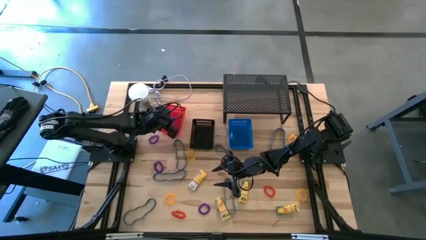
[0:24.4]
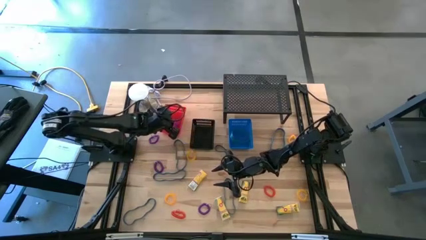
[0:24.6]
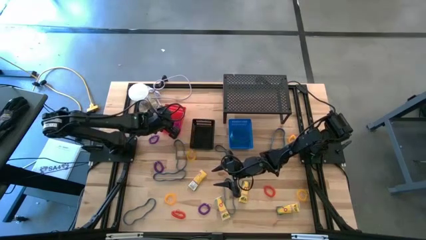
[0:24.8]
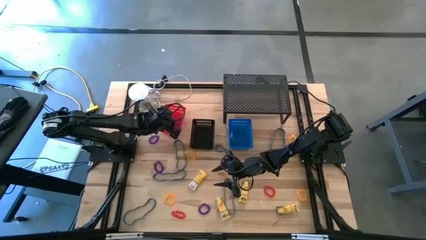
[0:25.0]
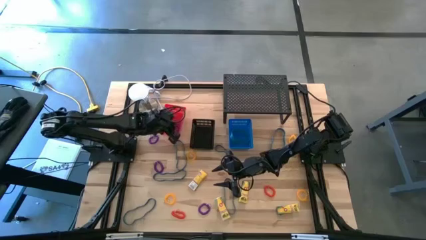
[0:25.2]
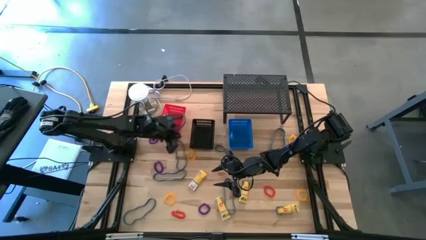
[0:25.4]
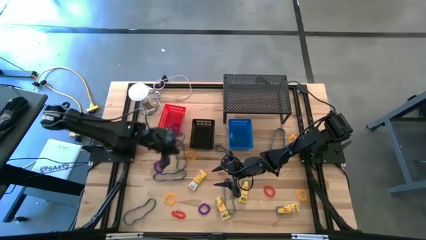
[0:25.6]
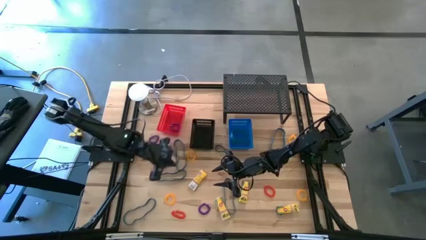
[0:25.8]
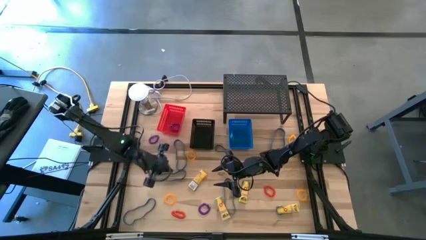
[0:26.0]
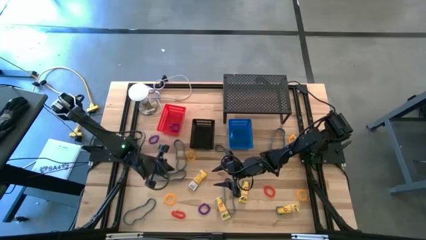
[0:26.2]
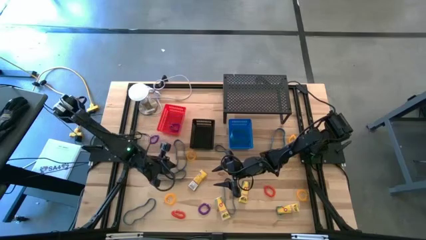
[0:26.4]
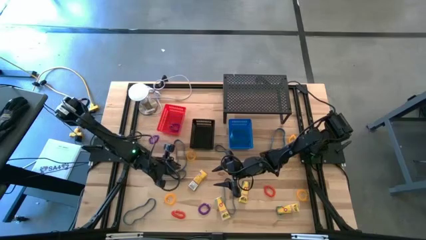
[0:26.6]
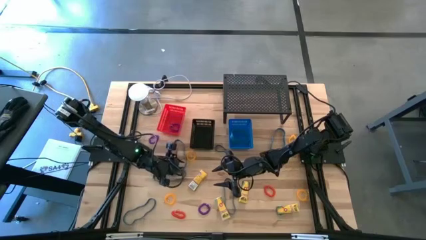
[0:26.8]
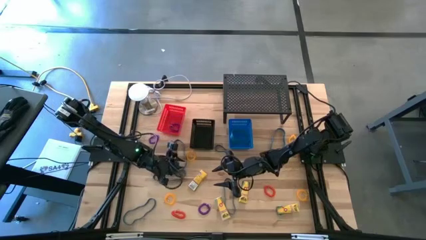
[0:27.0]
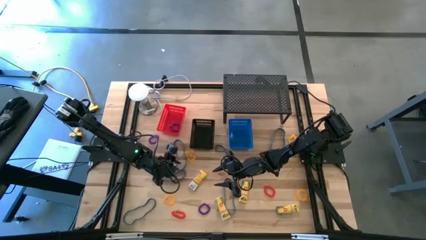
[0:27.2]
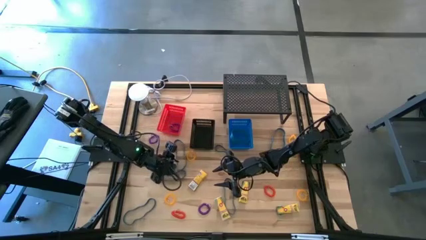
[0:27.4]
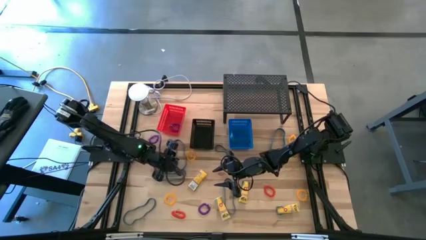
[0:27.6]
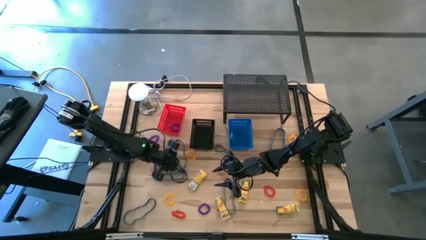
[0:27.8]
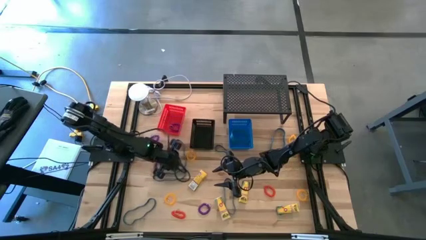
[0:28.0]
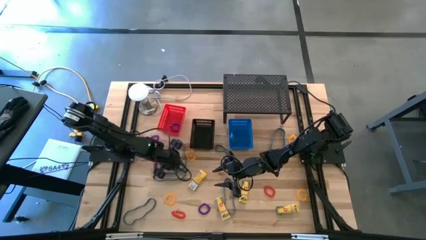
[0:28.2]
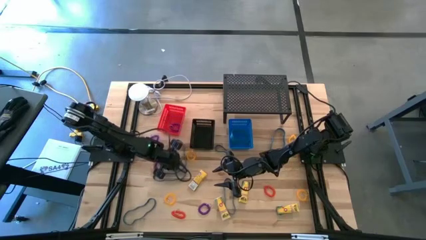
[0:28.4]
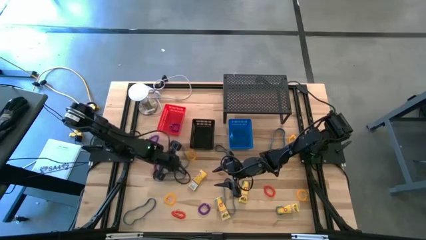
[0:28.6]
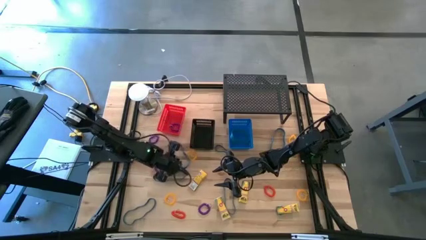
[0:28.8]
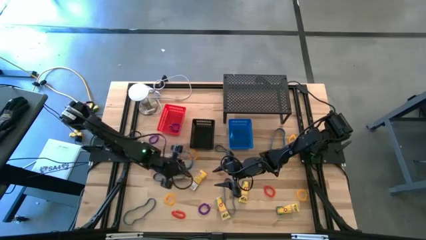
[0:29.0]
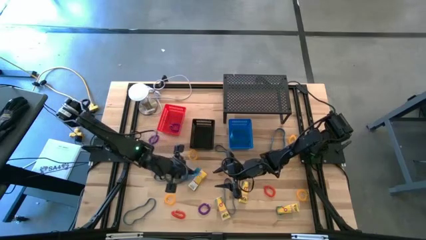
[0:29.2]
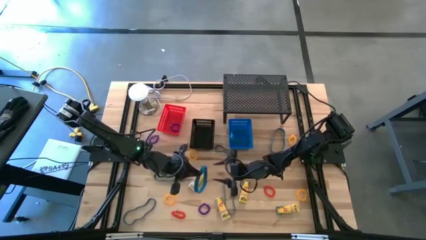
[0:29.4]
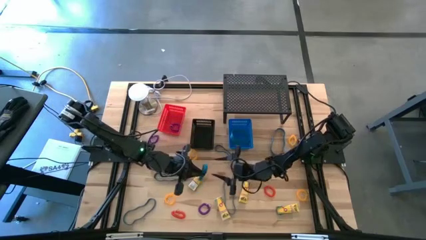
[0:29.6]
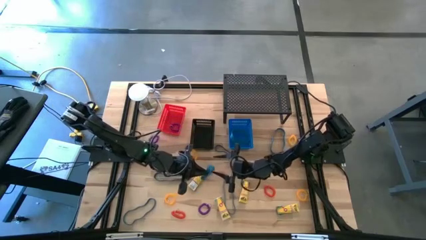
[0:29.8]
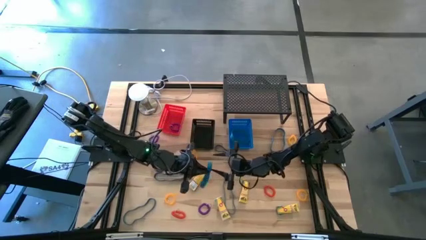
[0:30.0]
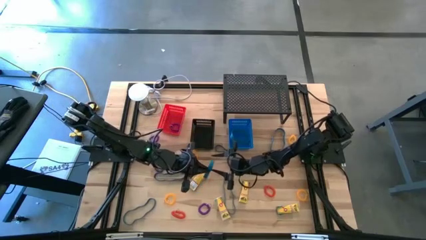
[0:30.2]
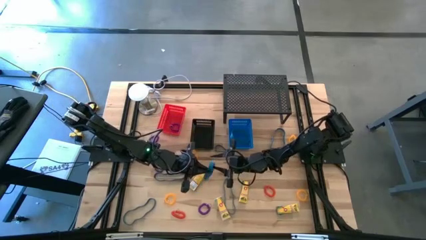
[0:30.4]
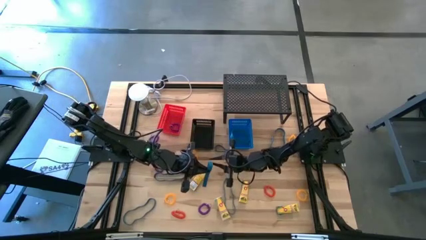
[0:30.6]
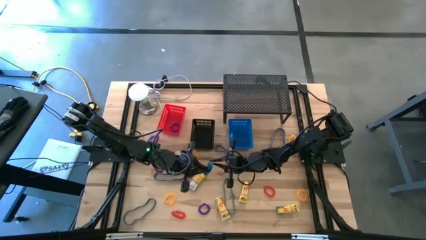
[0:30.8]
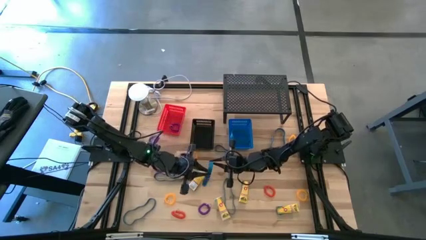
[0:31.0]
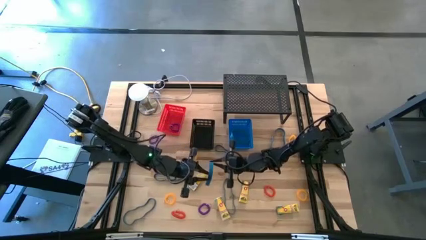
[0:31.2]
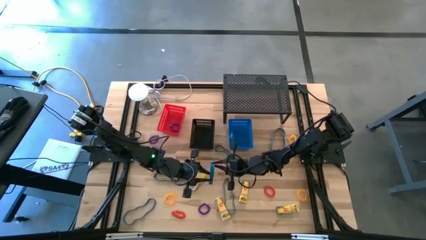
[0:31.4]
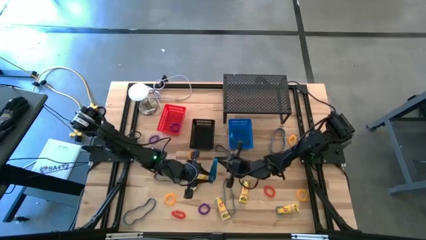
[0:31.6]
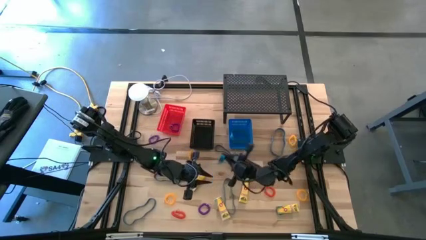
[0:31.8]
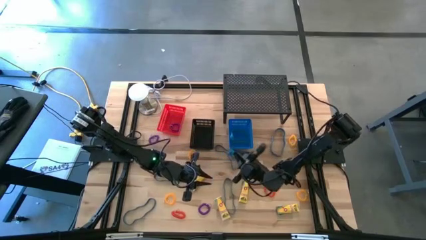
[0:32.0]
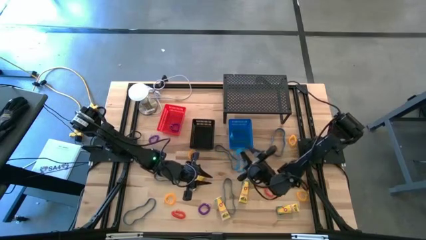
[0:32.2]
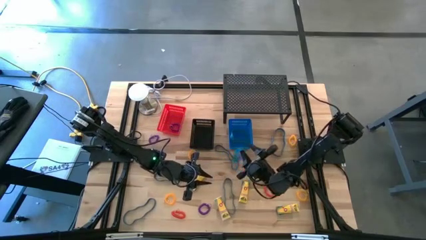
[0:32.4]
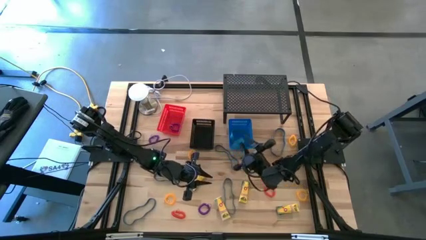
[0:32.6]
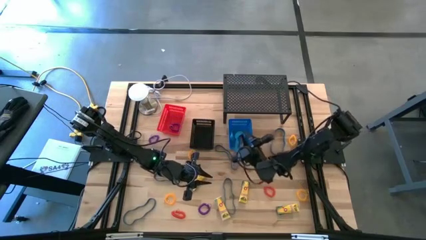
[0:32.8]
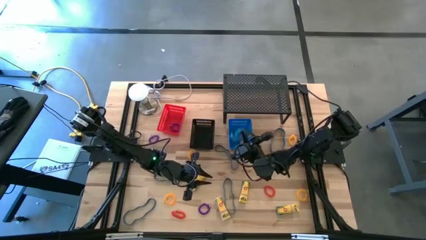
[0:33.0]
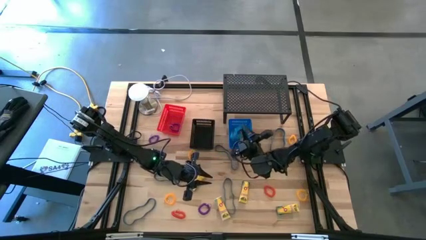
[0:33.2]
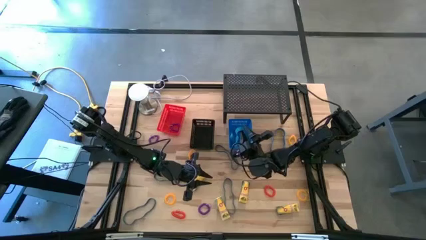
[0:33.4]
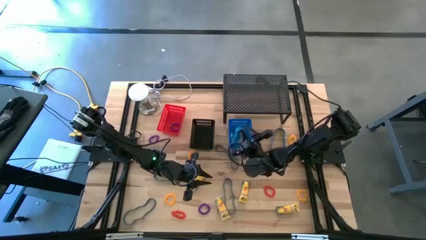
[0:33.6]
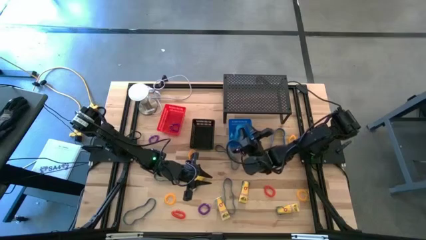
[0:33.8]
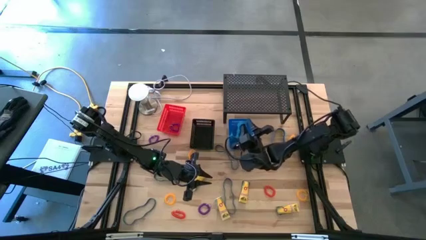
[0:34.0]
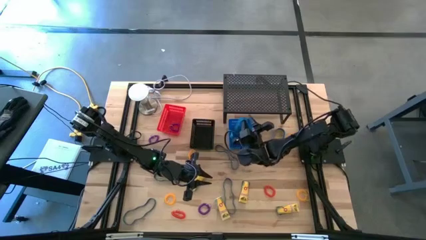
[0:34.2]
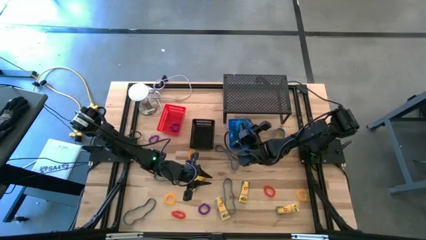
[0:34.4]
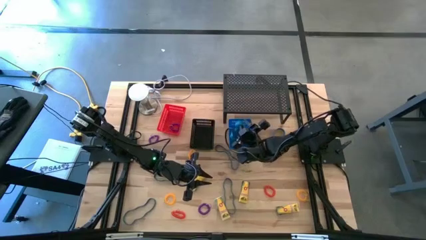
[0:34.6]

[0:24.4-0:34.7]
Task: Pick & Place Office Desk Supplies
Put the blue rubber band into the blue bin

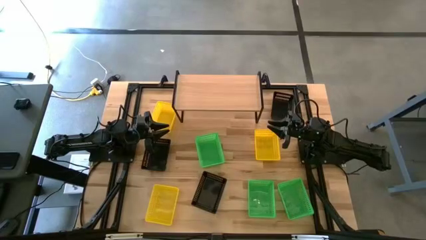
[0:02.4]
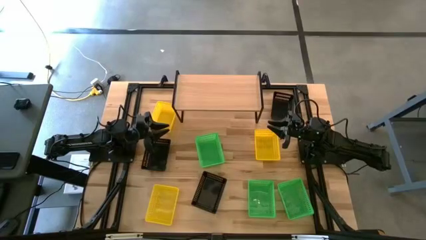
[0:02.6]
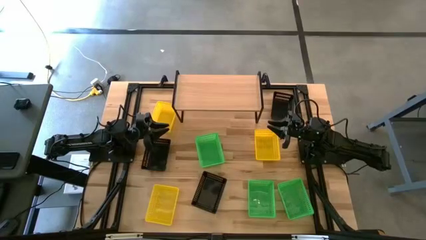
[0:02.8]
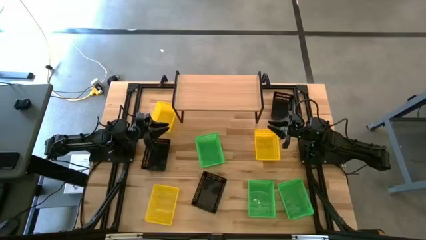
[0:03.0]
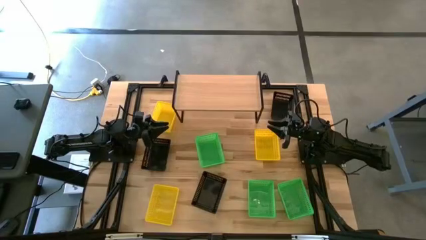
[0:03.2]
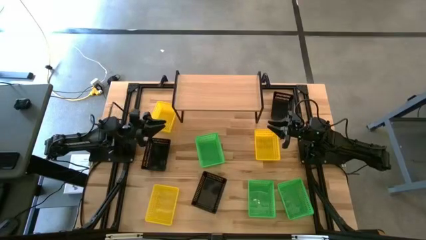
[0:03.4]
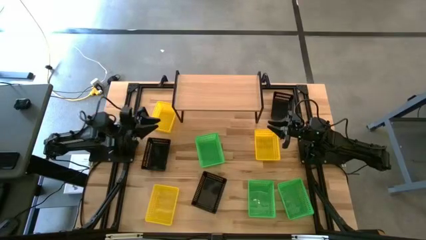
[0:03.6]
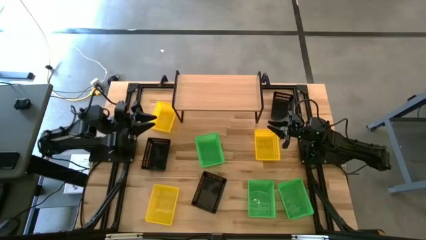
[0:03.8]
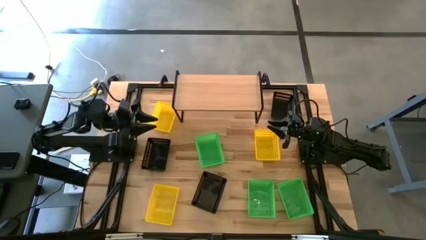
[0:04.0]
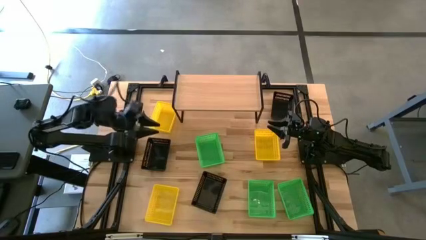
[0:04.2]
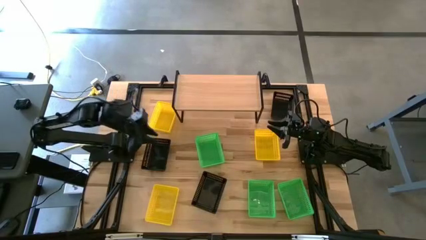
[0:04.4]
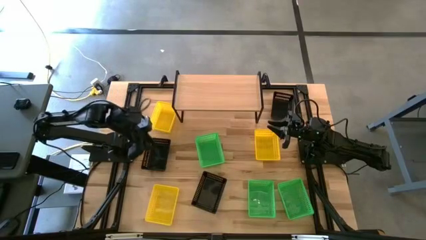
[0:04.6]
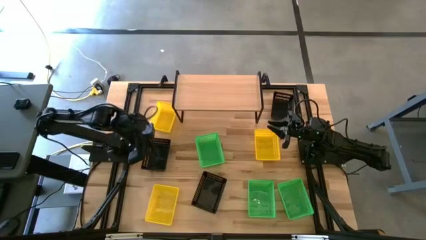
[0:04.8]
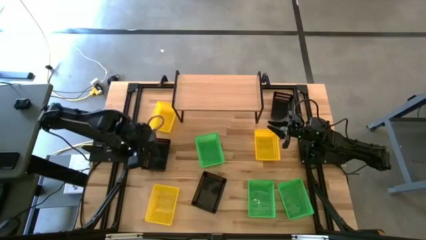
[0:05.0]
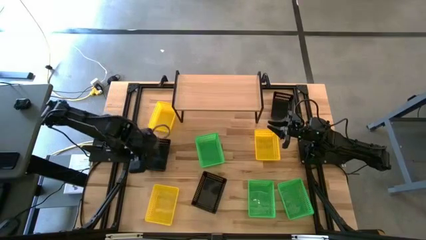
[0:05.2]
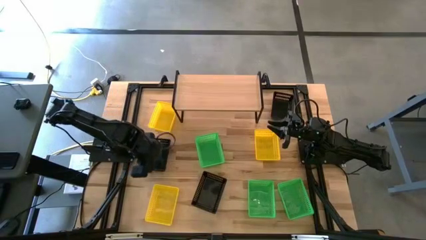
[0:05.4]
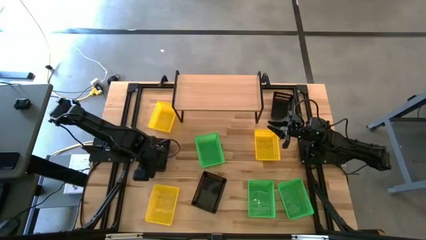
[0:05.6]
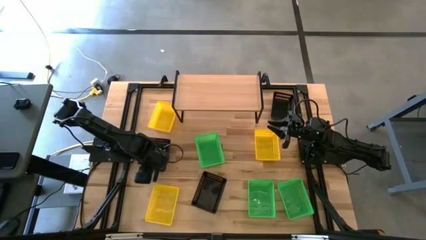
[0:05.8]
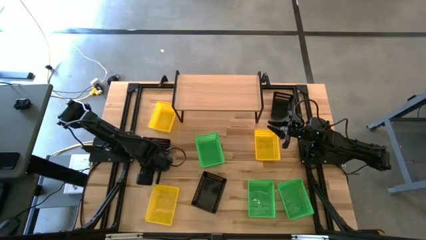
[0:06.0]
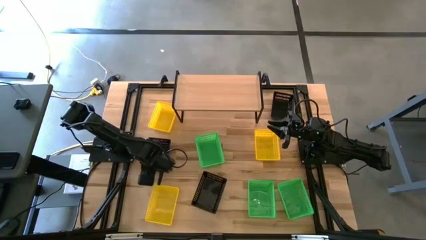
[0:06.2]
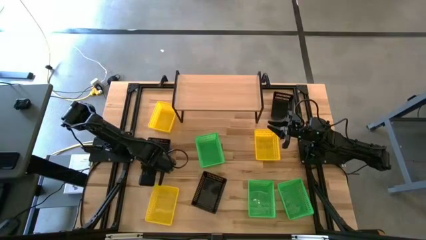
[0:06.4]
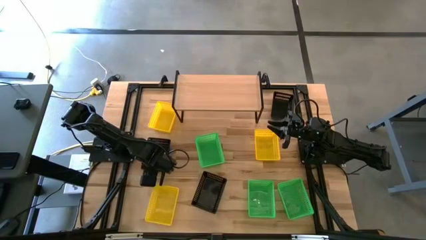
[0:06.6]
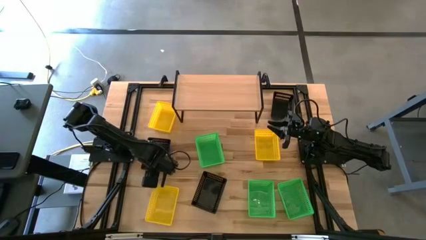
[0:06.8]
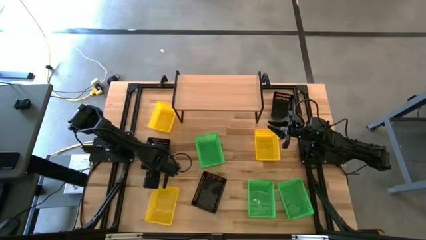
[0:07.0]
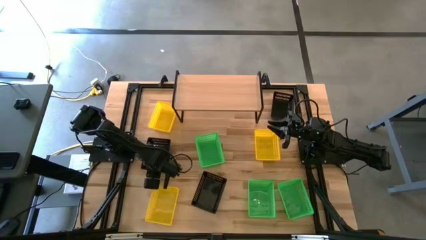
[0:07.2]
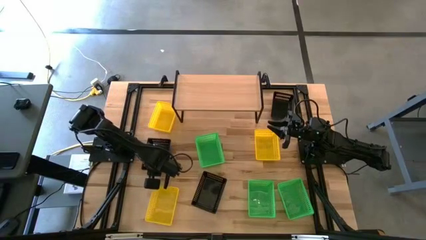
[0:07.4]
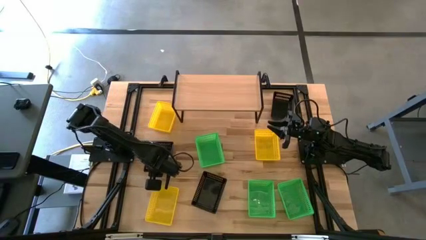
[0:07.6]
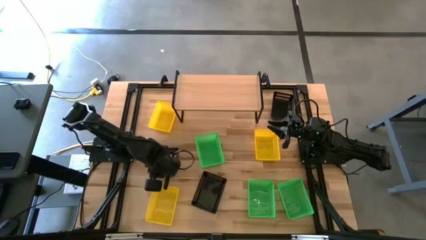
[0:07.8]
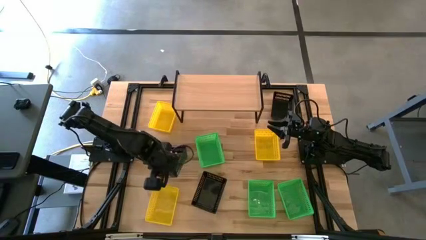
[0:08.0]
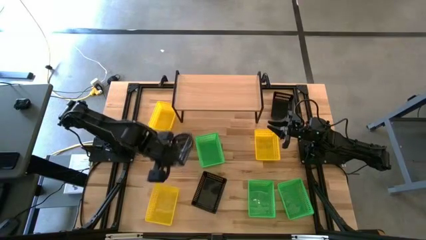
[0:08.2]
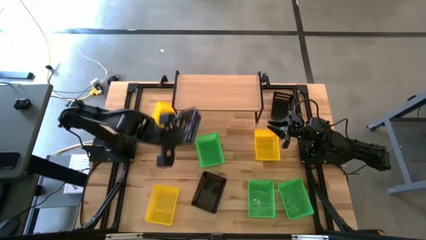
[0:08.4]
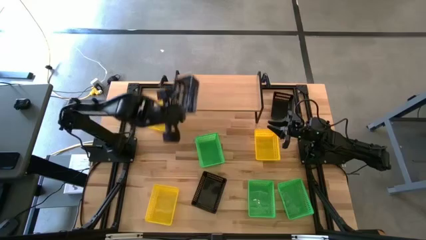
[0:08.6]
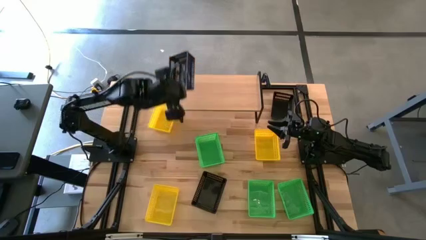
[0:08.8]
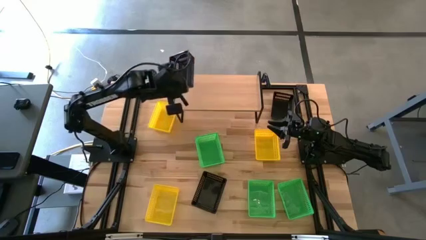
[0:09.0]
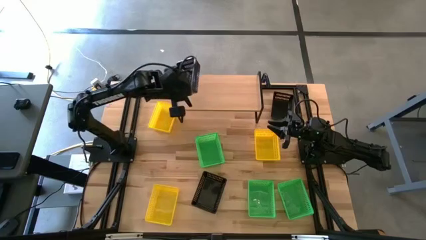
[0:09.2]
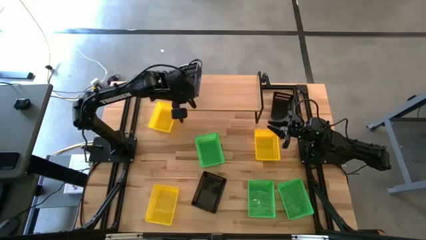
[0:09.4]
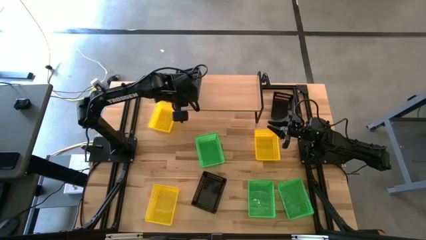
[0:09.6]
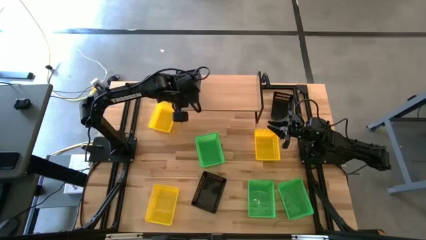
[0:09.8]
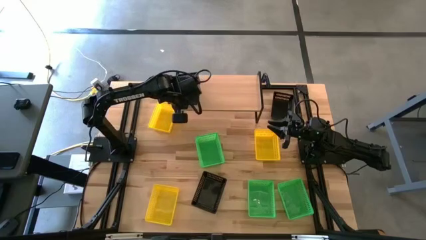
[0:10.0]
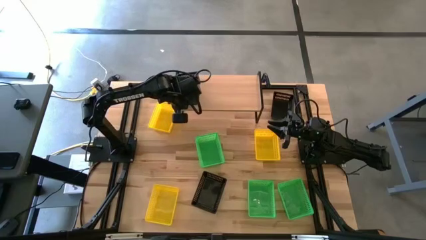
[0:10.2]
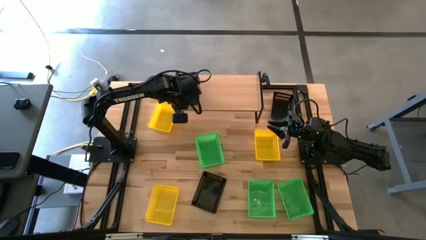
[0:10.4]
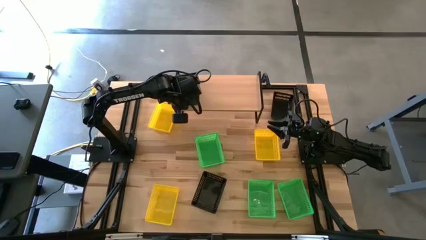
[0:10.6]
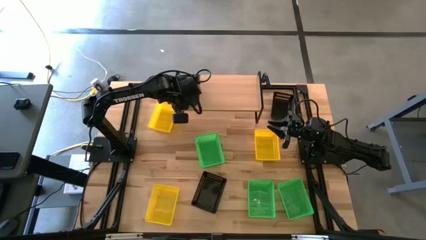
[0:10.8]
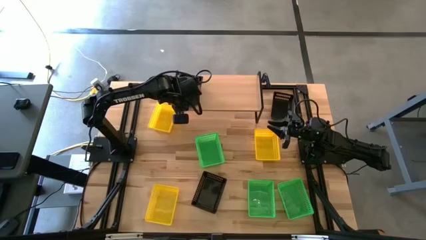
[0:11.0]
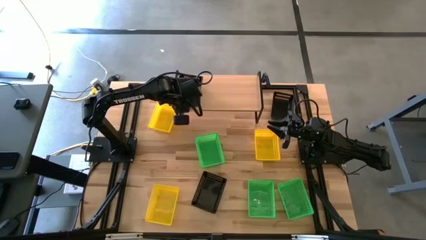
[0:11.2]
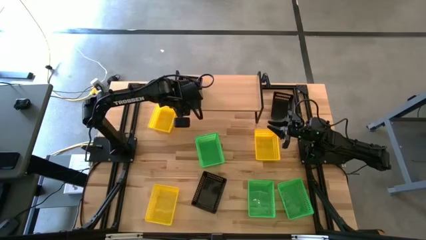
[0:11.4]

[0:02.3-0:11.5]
Task: Stack baskets on shelf by color
Put the middle-left black bin on the shelf
